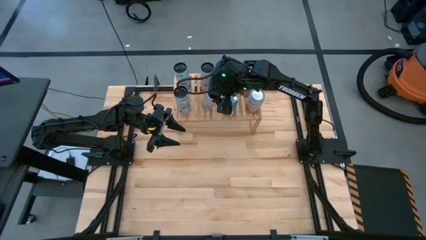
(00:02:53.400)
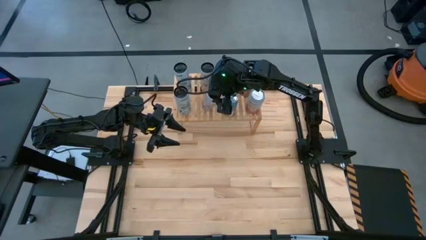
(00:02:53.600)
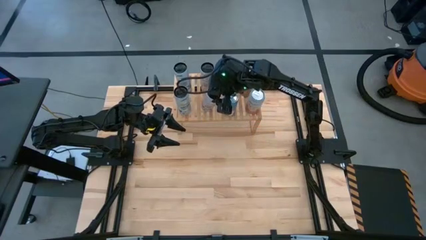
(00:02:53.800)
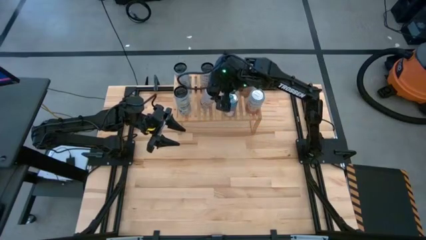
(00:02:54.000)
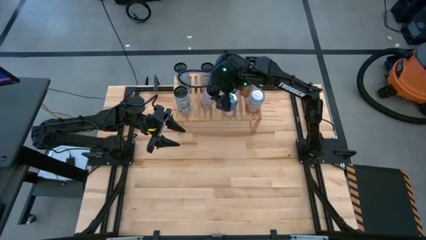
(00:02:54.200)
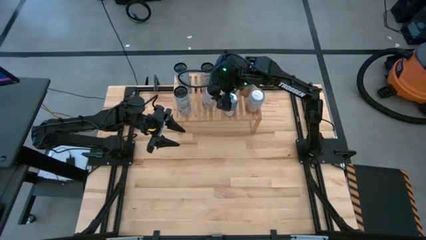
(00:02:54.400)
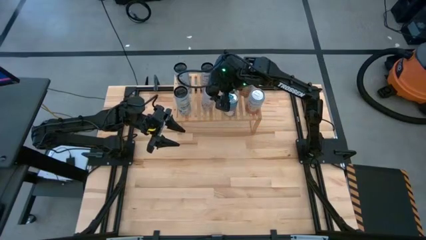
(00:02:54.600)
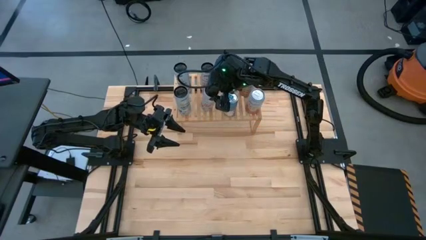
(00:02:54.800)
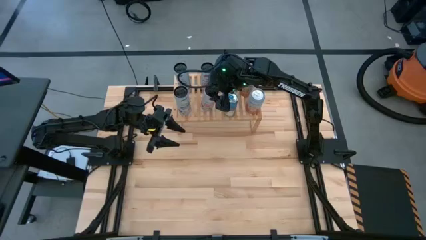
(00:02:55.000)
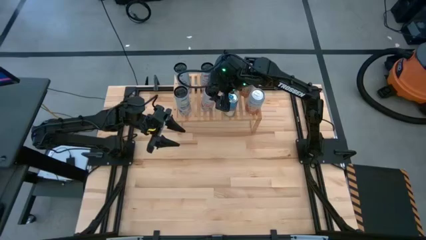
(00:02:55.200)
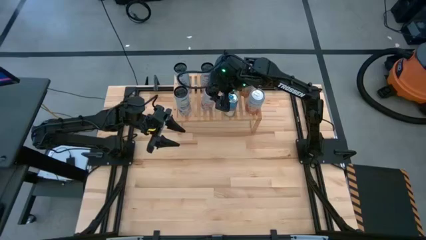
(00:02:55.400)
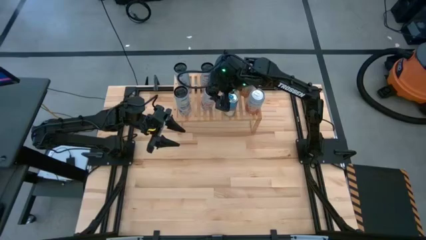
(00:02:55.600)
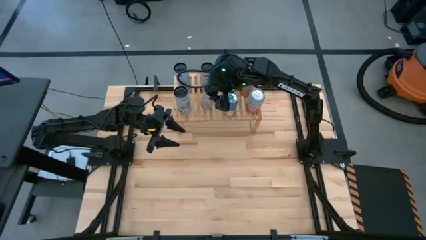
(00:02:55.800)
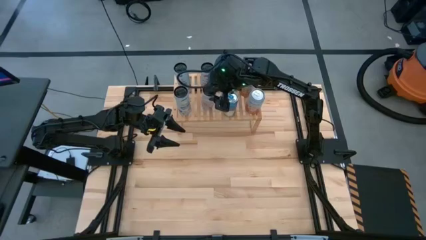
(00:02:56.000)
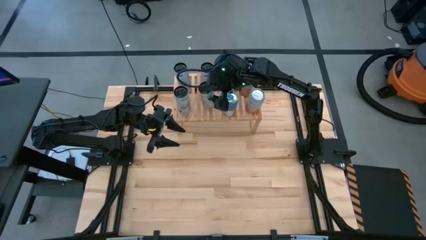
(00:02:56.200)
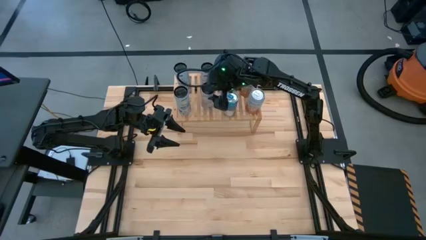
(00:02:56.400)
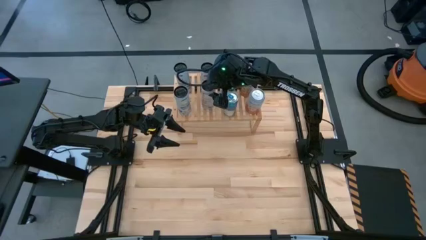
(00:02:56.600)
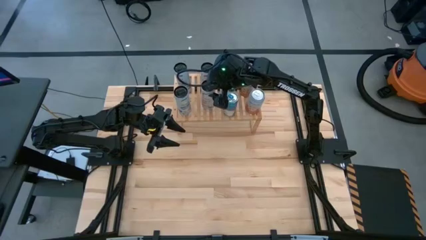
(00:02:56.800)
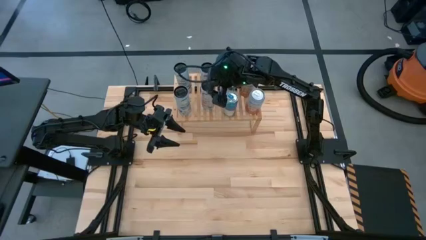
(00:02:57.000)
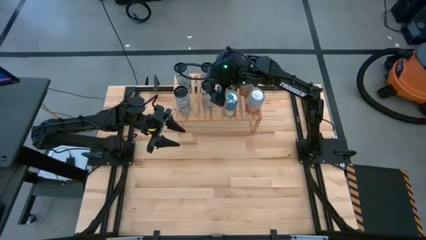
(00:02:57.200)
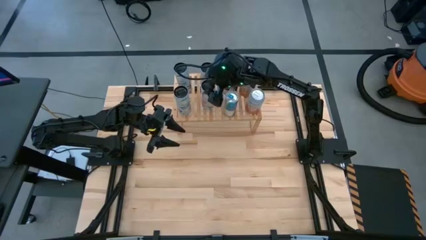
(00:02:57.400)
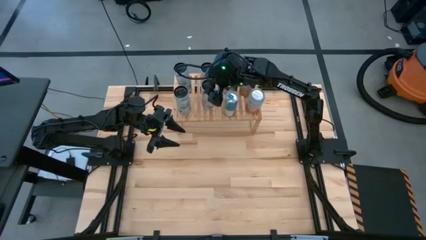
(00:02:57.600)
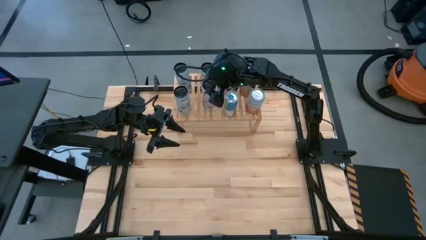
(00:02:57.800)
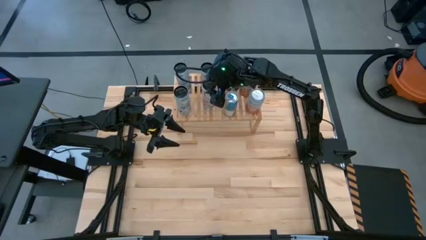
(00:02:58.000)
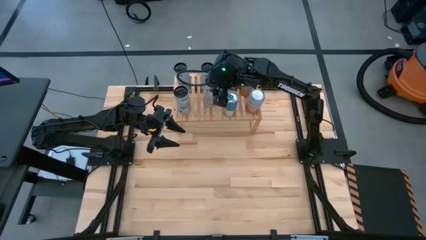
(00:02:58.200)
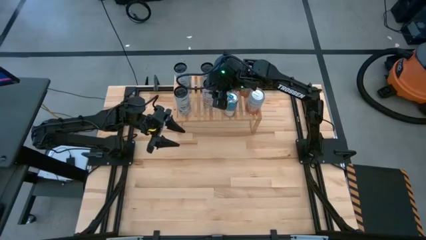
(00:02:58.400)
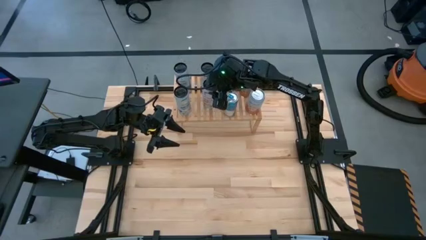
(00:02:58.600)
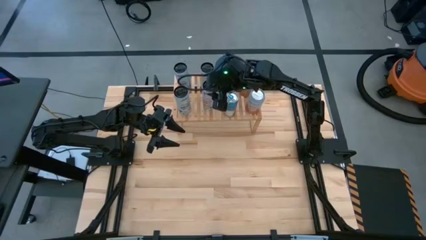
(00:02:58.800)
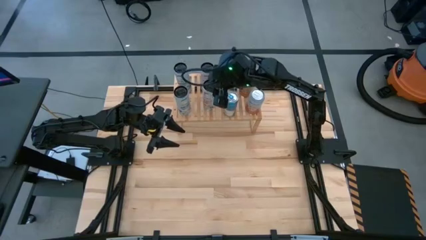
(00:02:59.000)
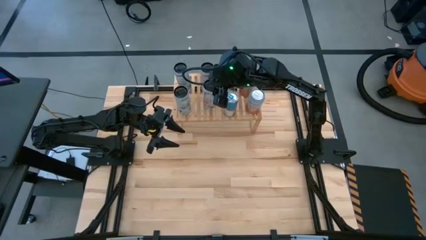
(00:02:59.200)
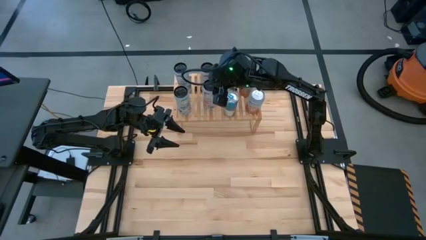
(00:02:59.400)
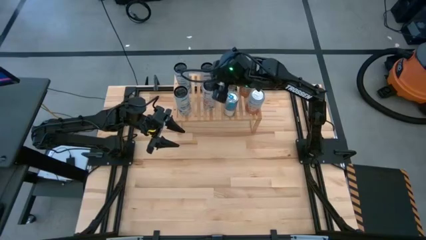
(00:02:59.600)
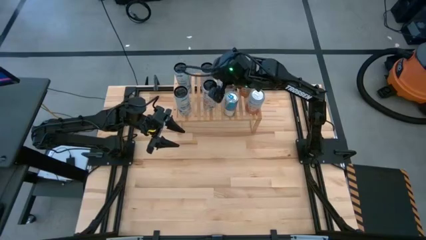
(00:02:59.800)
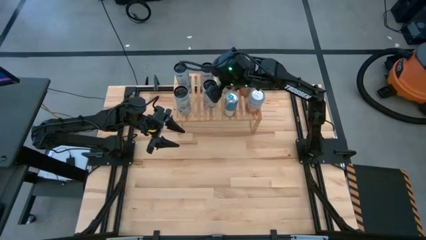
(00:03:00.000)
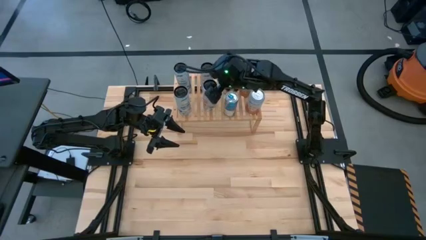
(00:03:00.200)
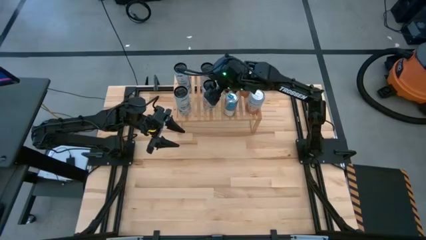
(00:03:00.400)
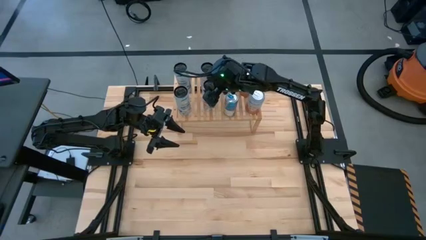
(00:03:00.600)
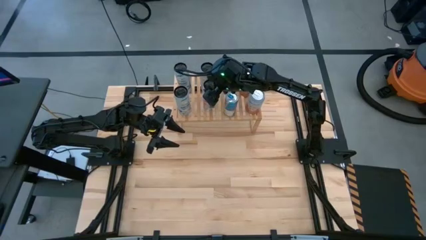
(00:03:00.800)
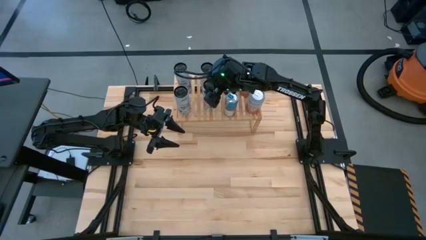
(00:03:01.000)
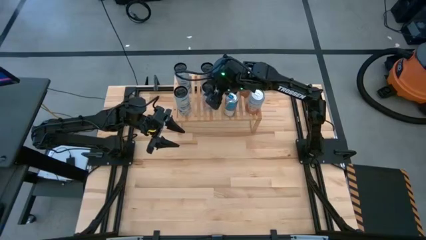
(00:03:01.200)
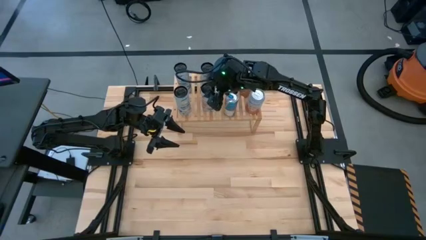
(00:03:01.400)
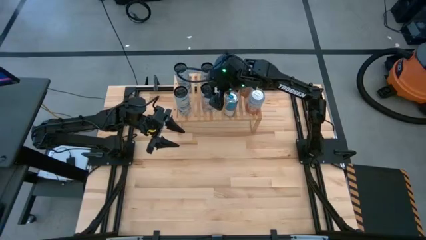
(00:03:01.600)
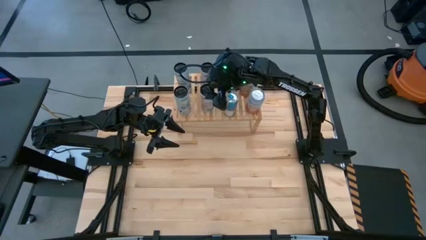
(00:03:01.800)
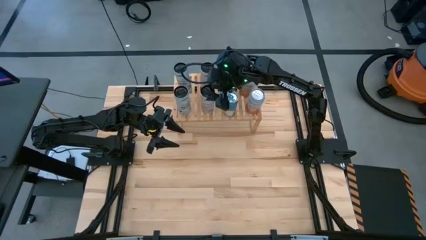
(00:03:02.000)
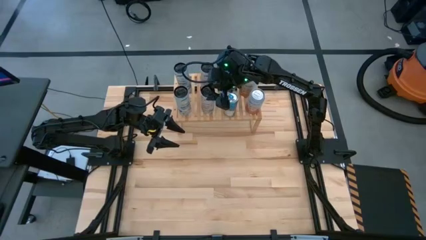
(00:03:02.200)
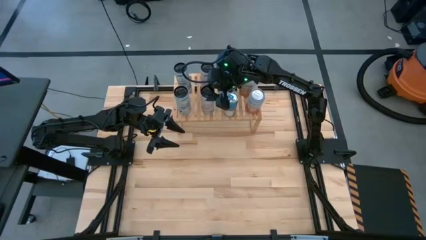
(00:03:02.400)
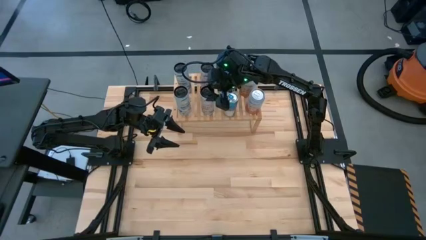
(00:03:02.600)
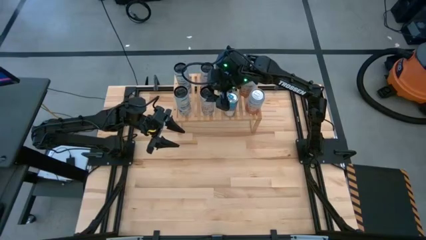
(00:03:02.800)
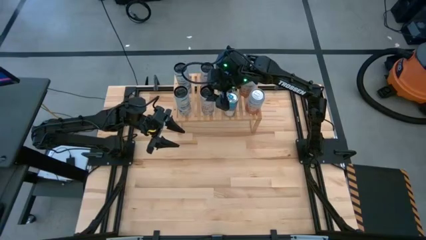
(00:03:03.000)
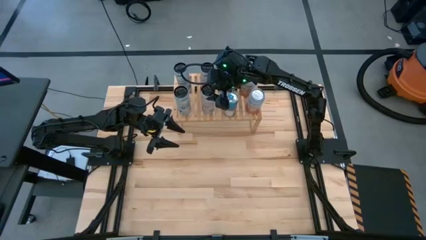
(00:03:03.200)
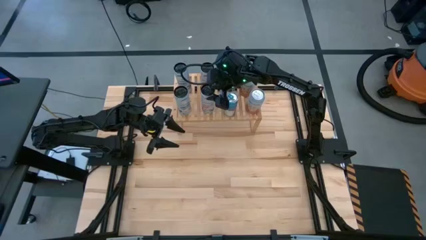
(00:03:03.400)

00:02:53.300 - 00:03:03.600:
Task: Place canned beverage on shelf
Put the white-pink soda can on the shelf aligned with the other white-pink soda

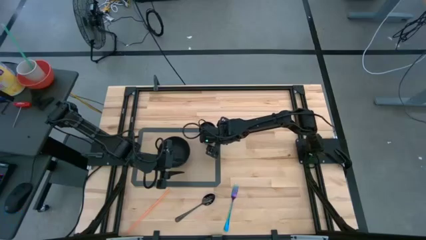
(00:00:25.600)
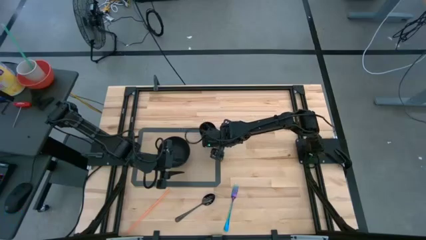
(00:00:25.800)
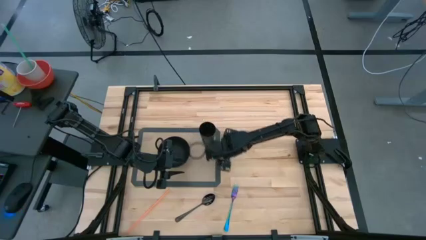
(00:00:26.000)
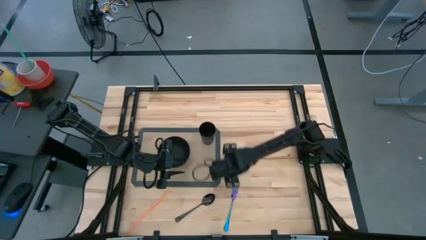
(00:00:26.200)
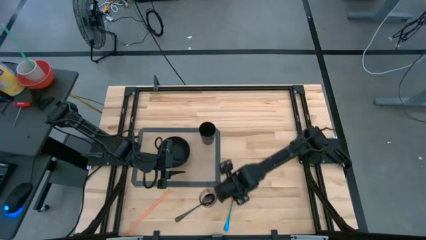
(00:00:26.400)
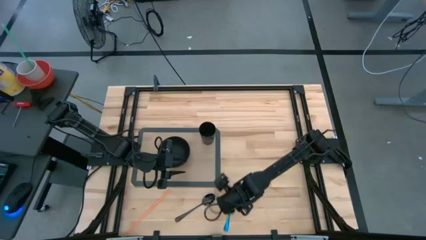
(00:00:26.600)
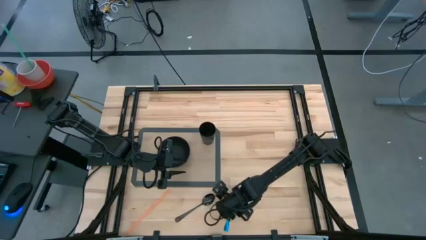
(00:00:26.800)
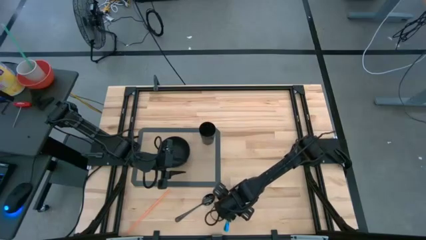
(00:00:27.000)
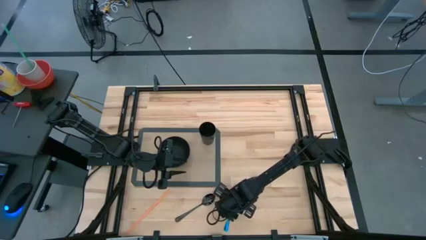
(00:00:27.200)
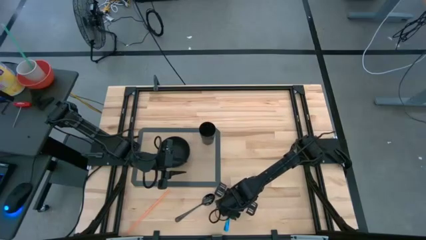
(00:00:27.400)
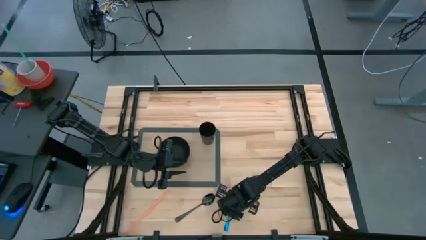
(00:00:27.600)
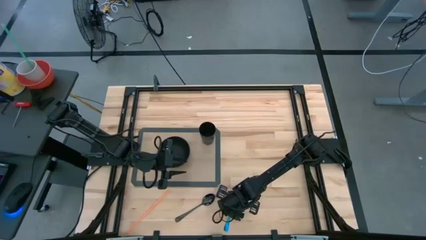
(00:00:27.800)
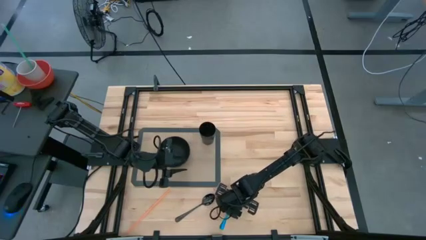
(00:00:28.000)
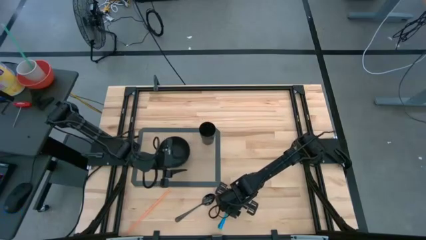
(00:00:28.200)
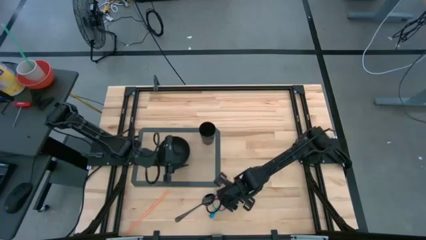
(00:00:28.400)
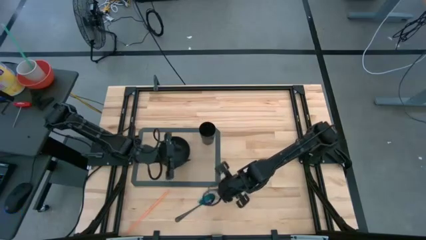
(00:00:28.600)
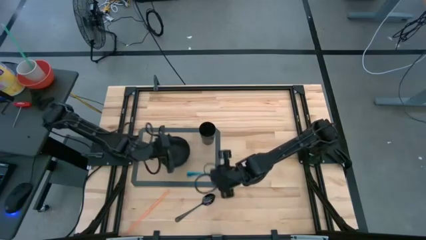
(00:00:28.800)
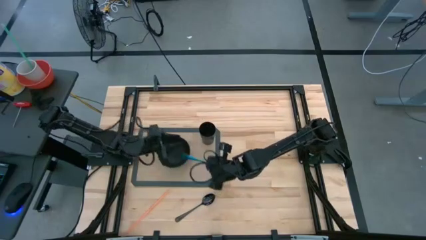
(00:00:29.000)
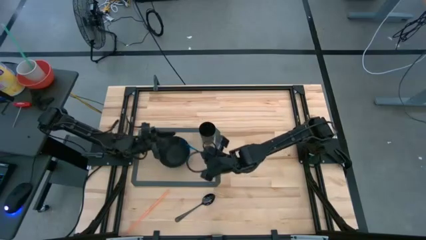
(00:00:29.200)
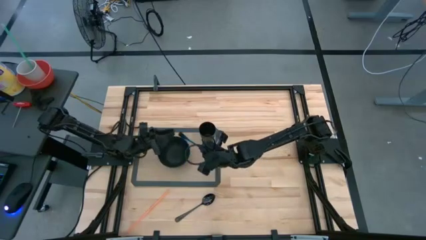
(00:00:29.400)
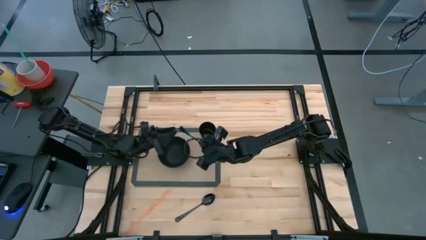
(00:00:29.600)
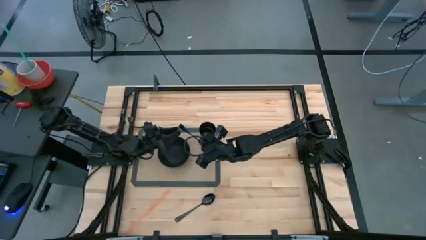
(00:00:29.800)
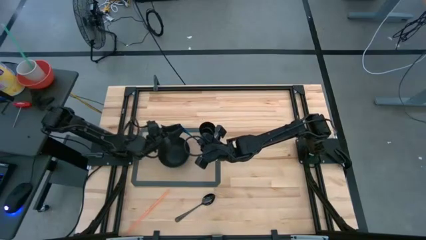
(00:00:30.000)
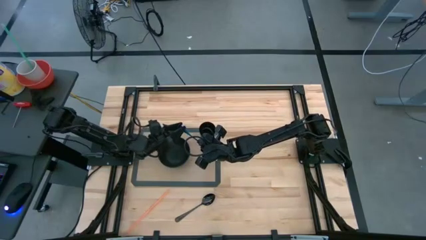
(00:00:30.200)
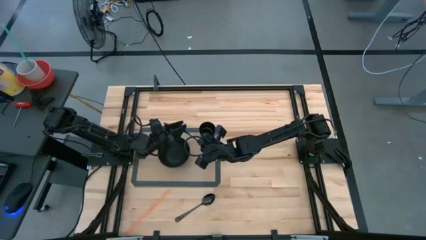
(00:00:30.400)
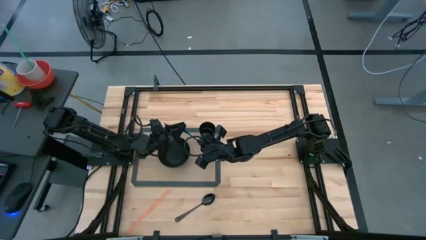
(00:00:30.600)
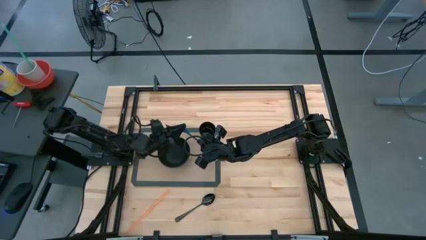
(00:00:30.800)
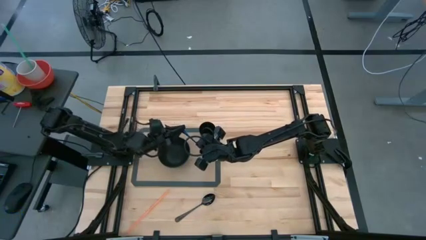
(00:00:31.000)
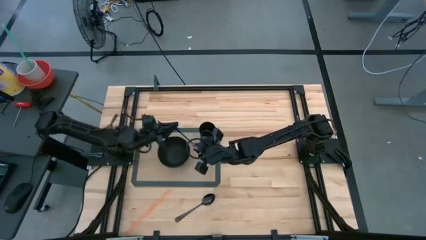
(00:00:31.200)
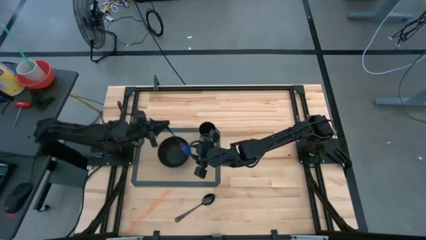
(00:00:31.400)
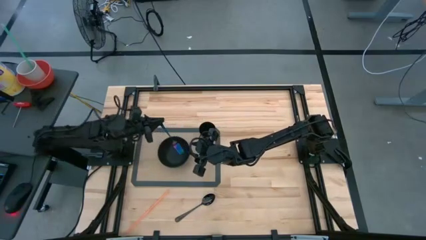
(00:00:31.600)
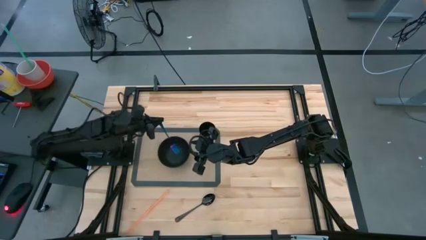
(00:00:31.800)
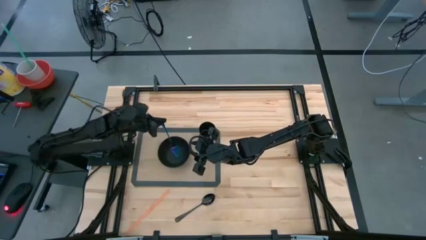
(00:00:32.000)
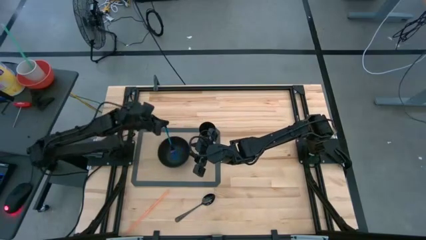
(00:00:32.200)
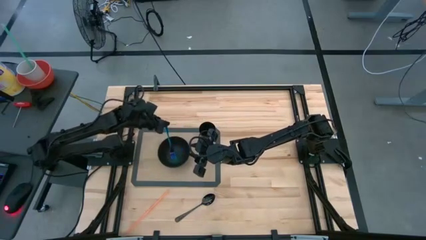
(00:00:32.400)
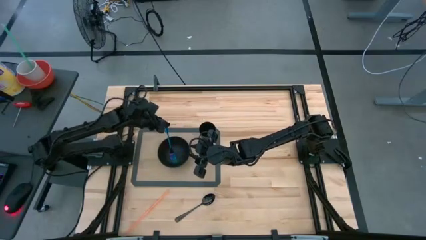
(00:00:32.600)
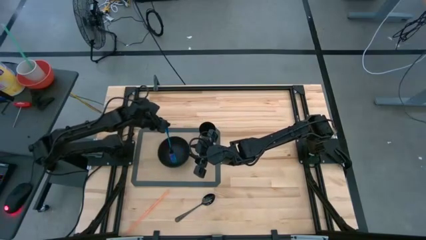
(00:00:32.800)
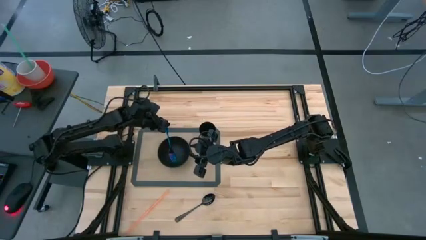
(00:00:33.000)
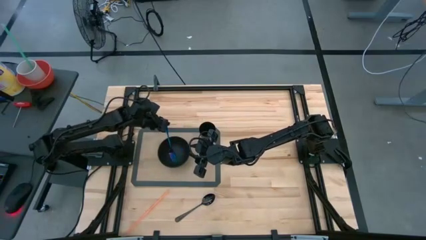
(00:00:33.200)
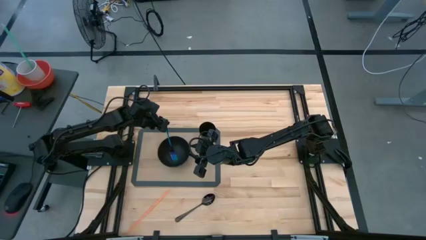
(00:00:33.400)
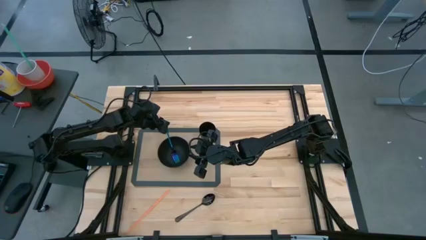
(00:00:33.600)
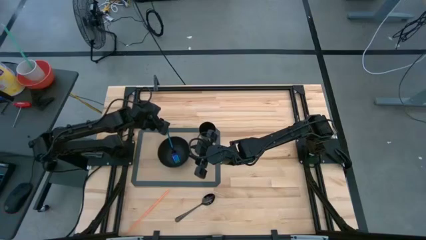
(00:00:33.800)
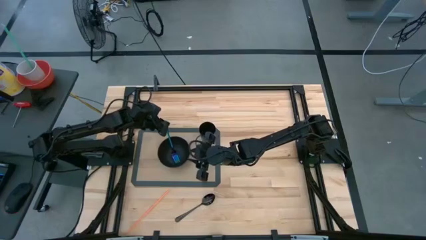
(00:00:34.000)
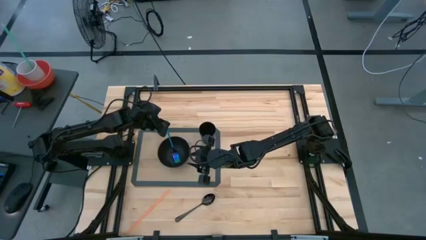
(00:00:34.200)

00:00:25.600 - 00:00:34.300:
Task: Pick & Place Utensil
Put the blue fork into the black bowl
